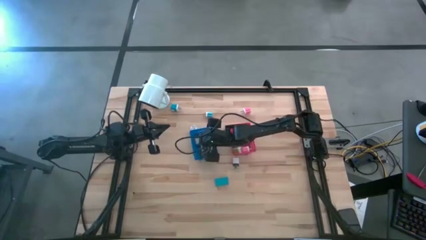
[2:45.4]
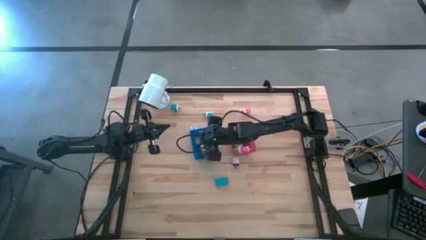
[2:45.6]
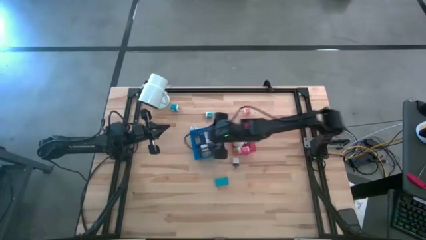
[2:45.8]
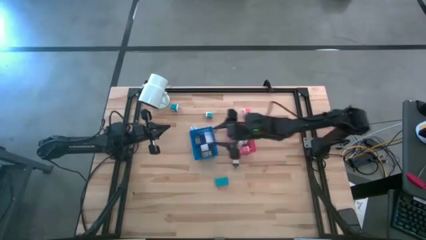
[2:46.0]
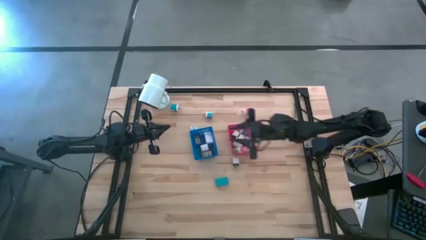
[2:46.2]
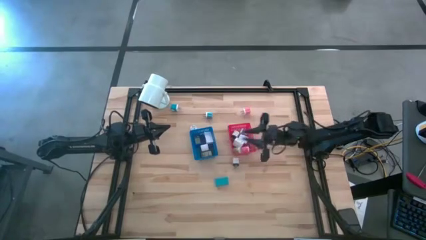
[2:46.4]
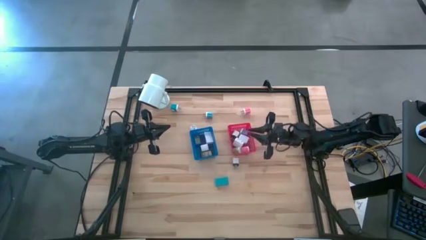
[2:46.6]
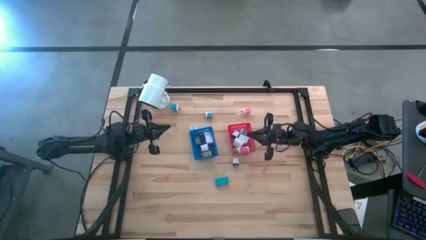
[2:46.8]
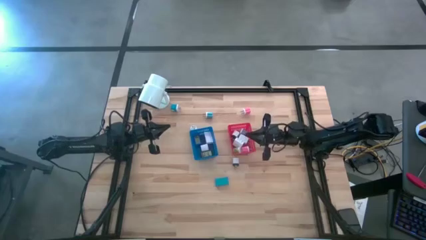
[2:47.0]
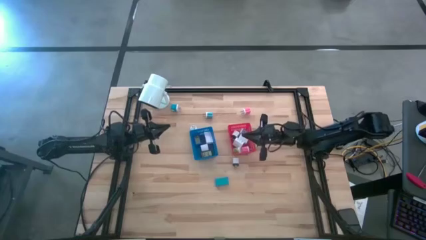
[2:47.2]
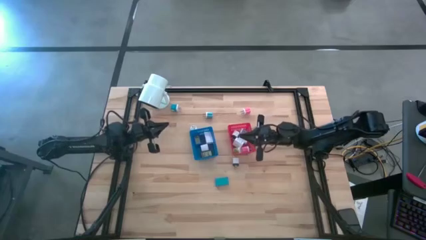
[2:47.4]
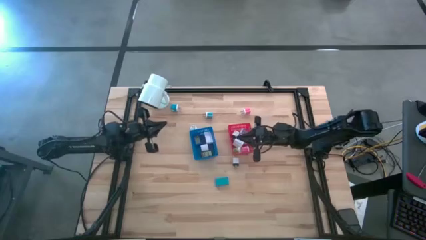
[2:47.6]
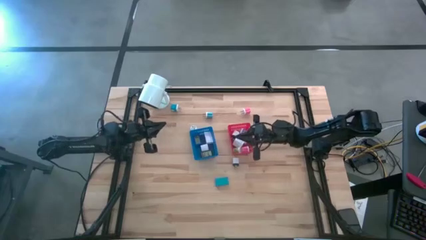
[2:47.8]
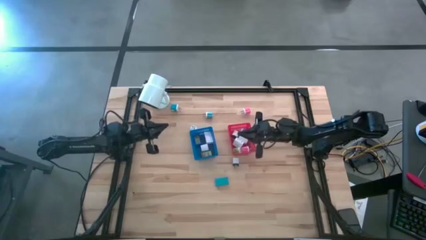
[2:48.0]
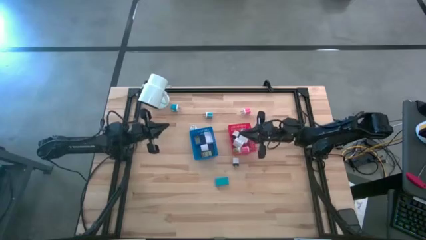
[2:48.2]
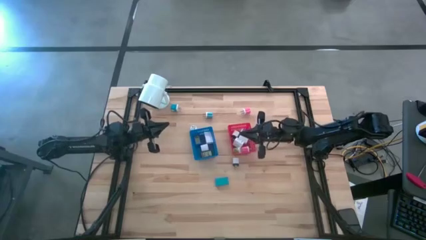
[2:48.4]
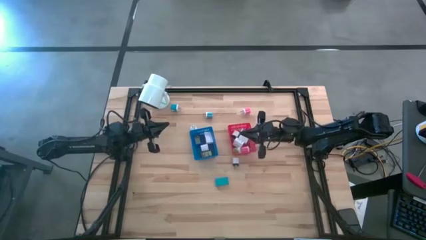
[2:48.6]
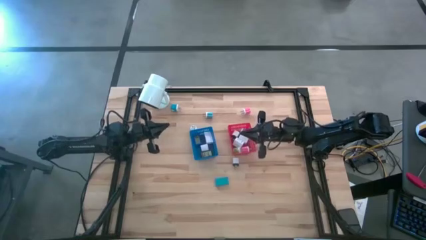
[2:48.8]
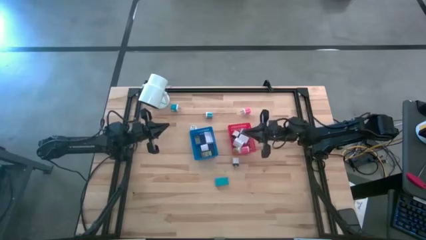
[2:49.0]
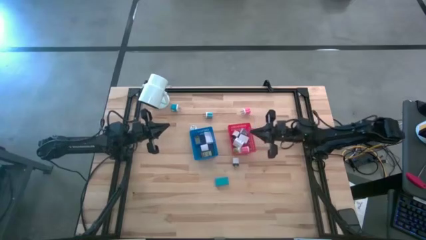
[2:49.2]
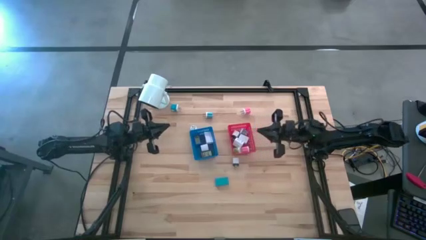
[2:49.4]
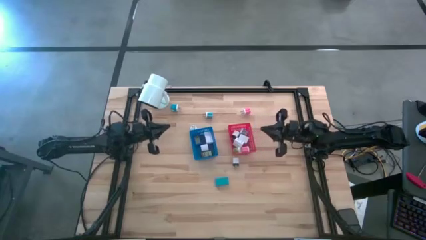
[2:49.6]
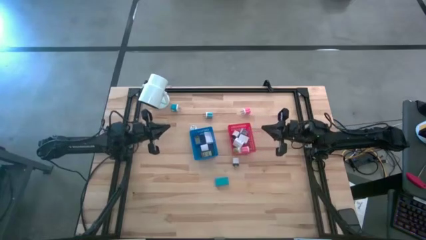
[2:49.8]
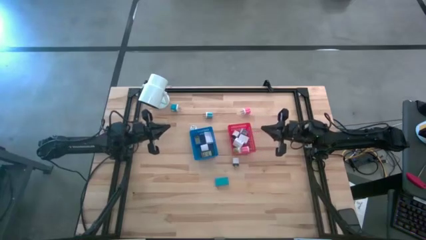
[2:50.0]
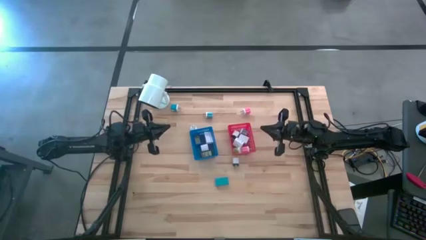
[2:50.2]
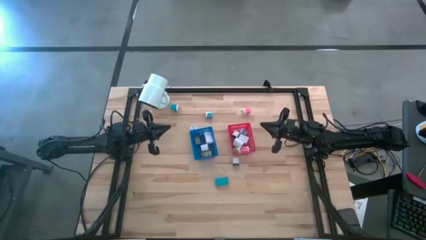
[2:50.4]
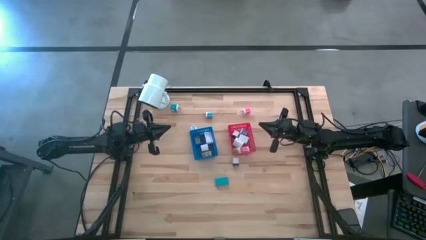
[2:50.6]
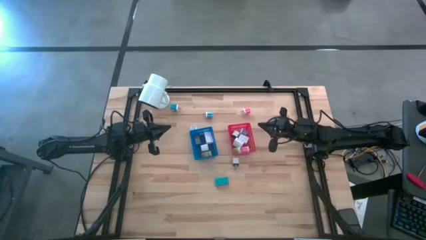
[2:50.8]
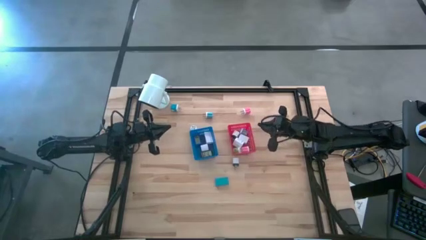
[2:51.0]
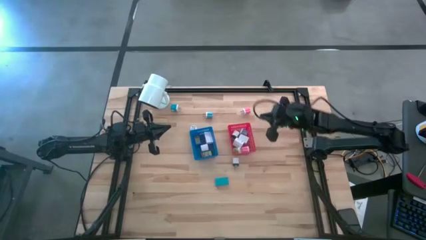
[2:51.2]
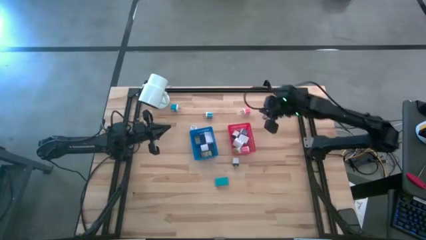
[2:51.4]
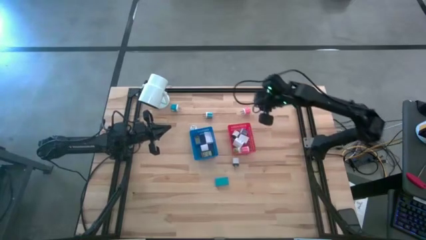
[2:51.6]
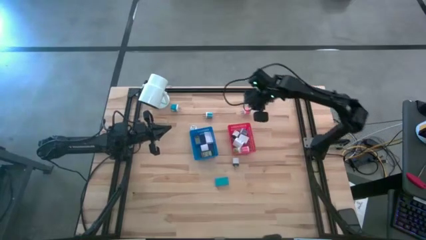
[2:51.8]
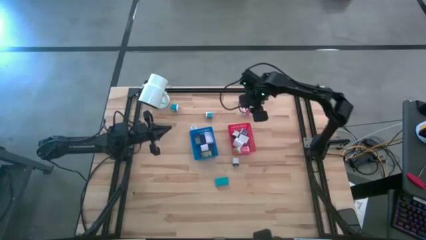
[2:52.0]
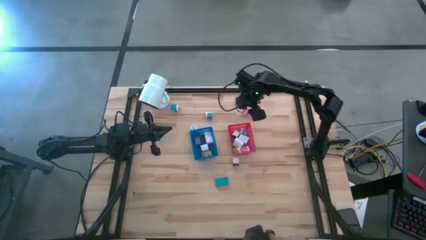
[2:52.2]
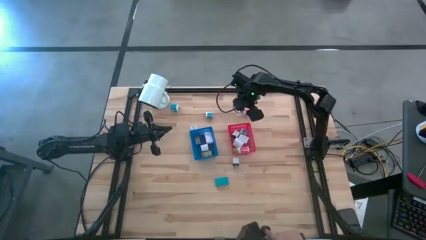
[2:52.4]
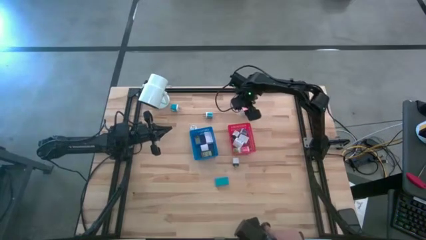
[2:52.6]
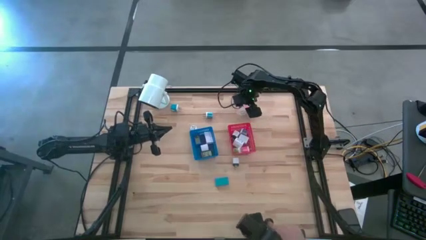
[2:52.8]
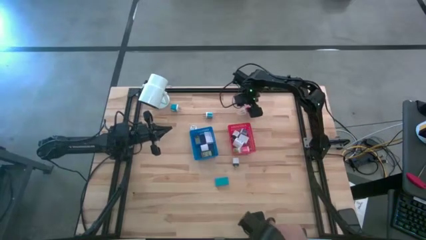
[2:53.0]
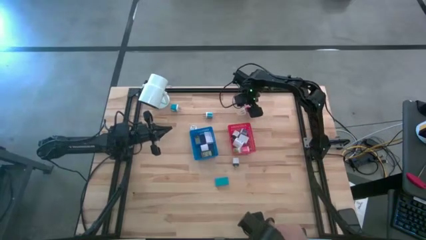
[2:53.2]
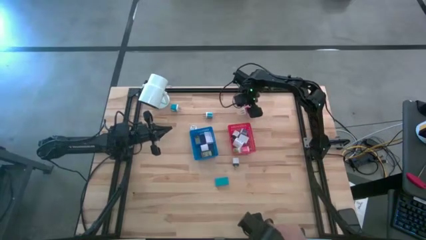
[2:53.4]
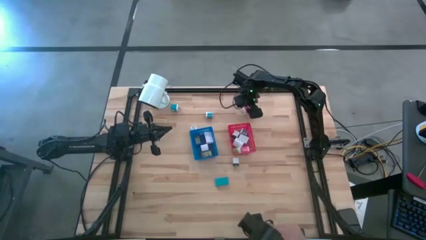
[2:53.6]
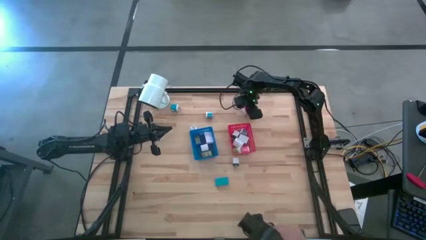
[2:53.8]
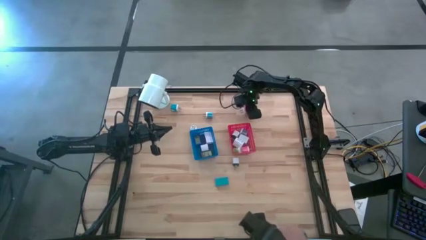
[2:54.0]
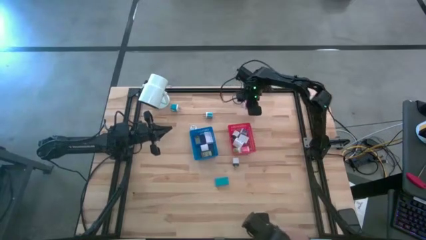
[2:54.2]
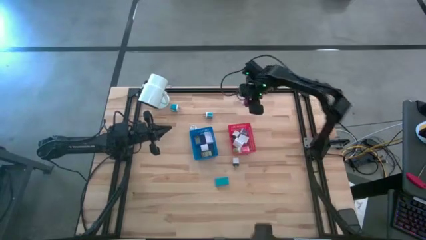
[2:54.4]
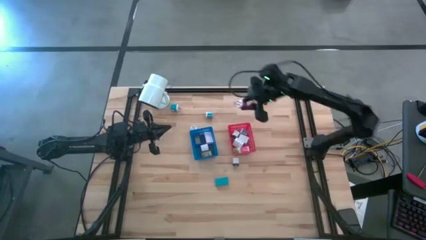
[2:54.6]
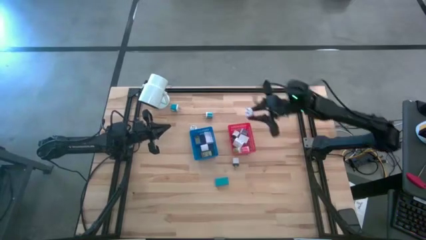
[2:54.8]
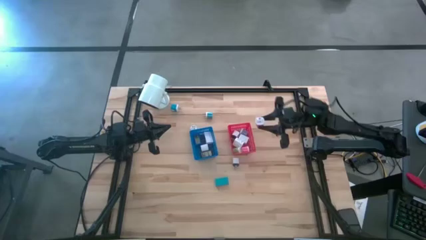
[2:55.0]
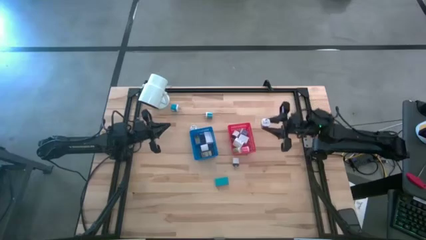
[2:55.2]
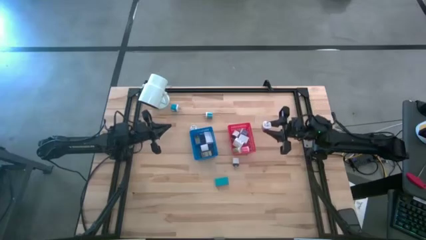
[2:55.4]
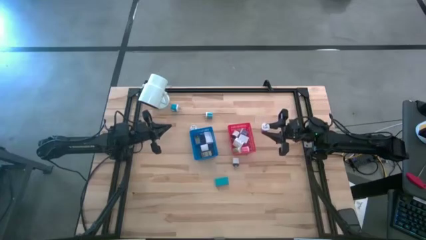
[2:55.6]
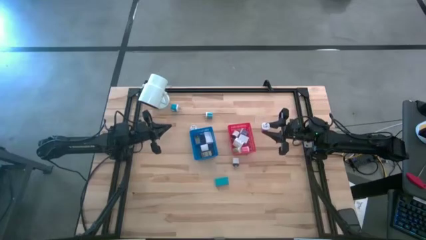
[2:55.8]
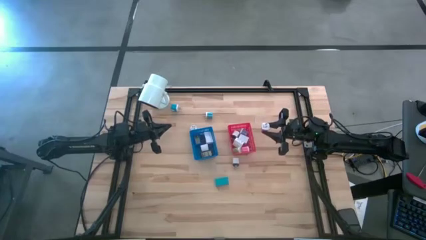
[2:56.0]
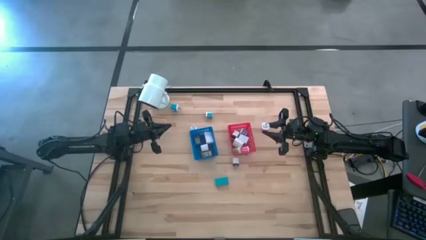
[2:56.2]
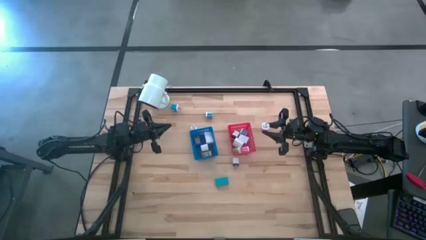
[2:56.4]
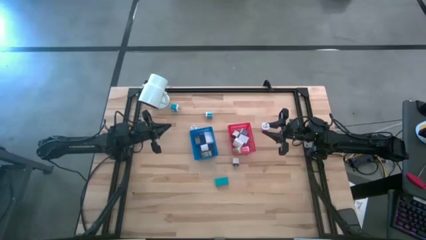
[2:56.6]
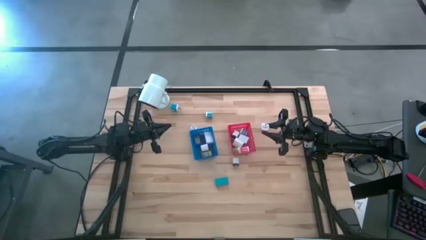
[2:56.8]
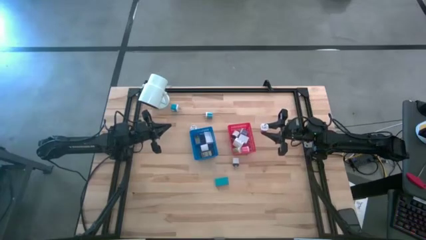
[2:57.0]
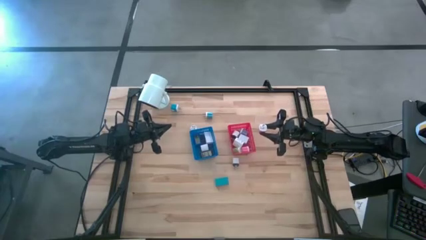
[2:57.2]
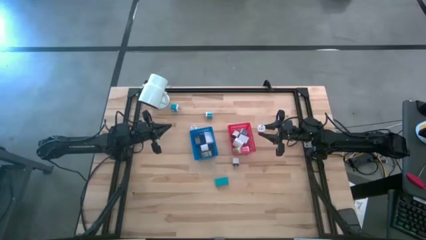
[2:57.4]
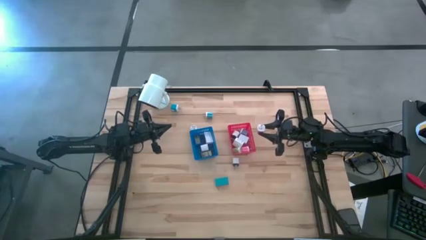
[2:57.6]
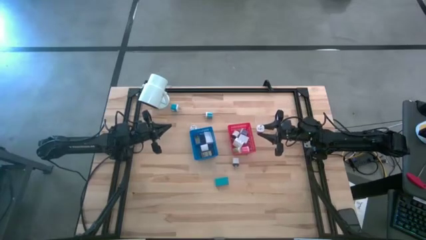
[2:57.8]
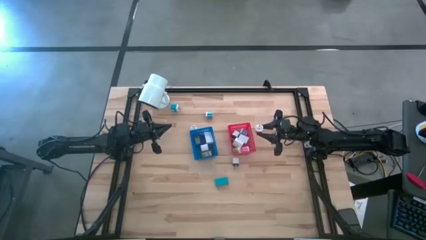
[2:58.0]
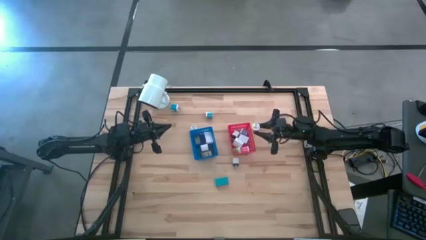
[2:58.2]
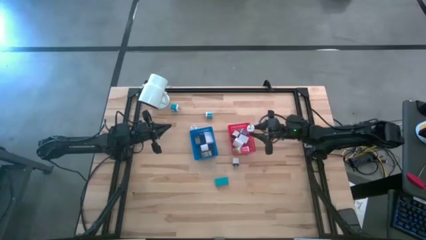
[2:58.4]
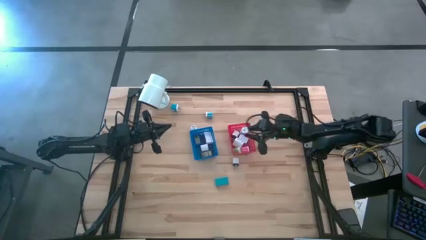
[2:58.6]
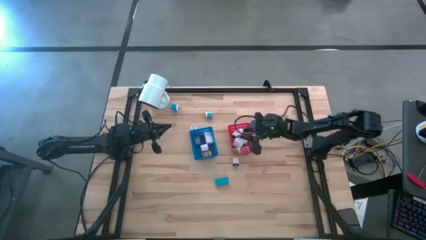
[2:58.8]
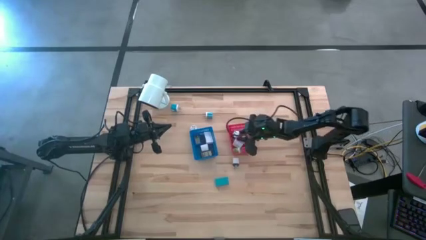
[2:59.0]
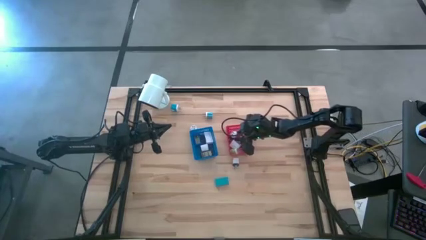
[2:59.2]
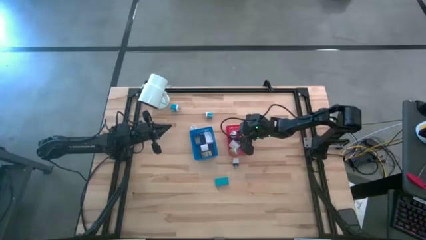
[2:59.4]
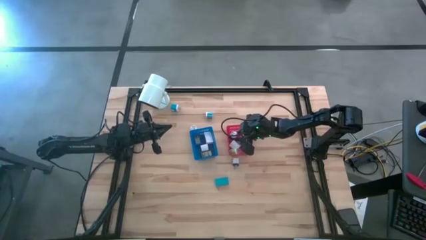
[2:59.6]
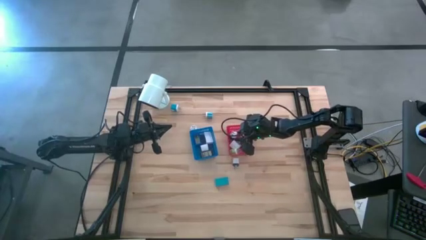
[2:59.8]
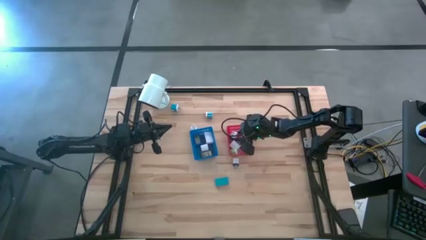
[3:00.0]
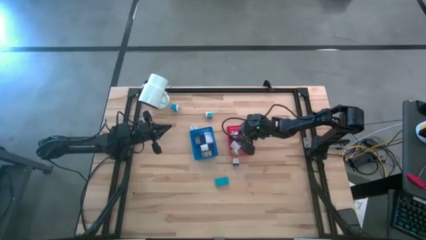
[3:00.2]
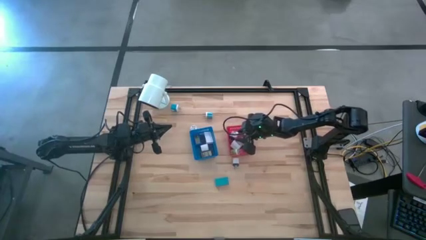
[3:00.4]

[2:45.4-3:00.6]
Task: Pick & Place Office items
Put the pink charger adapter into the red bin
